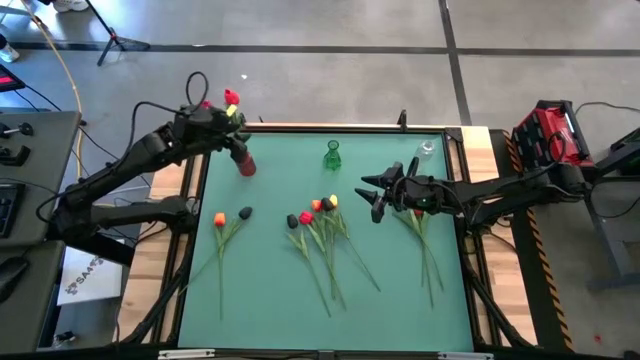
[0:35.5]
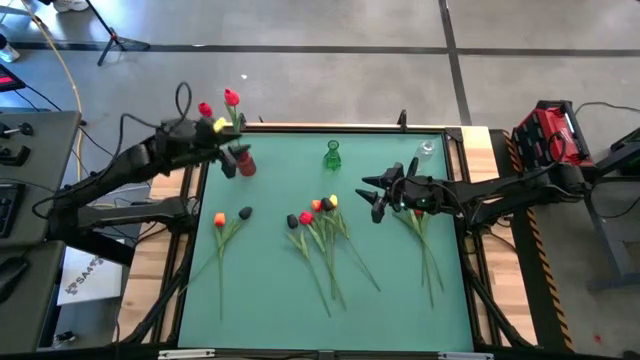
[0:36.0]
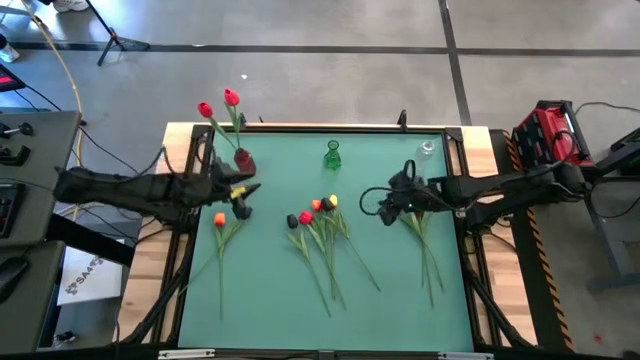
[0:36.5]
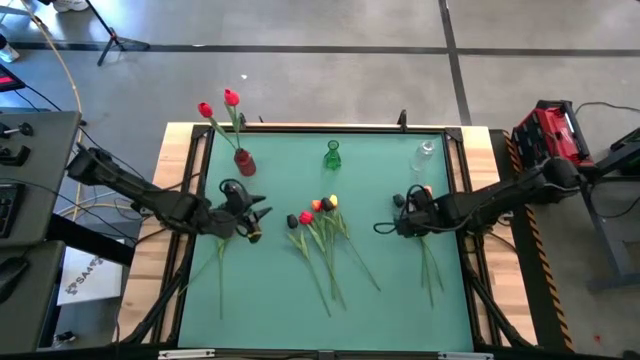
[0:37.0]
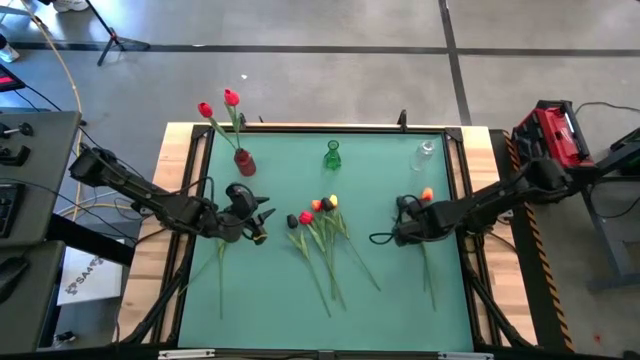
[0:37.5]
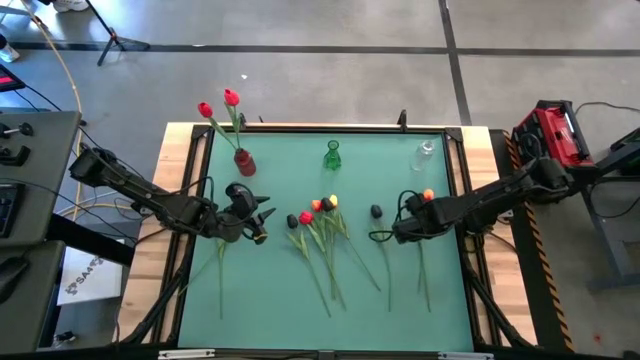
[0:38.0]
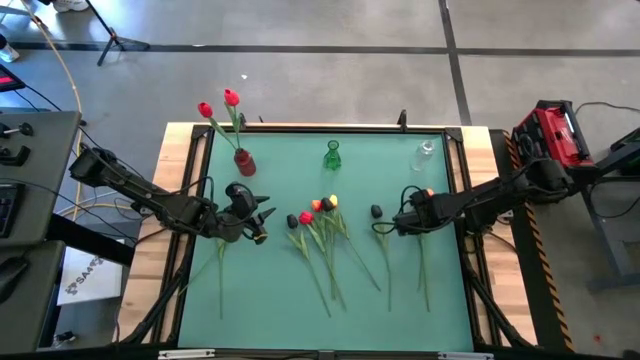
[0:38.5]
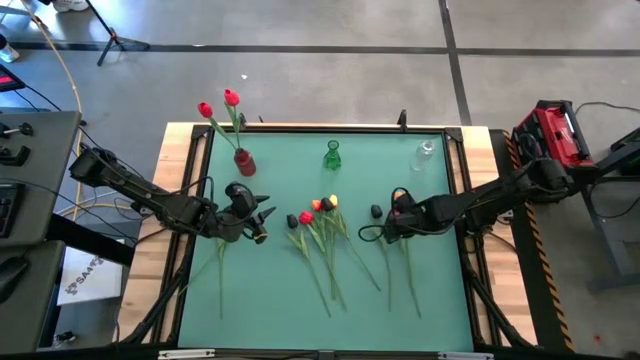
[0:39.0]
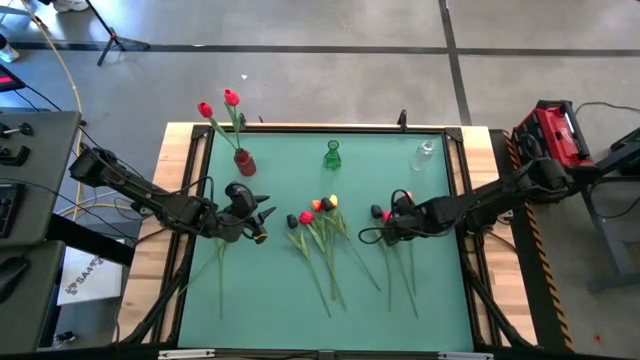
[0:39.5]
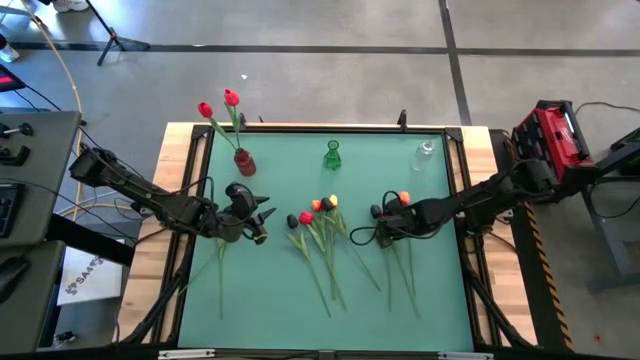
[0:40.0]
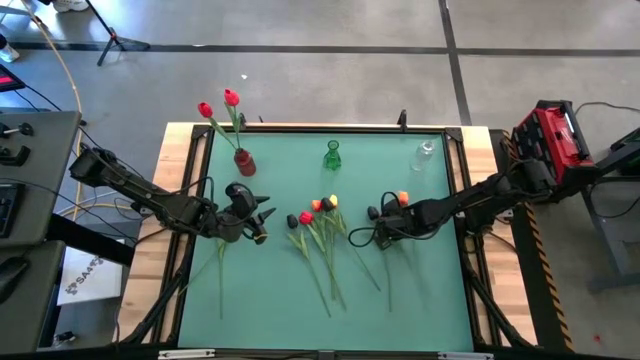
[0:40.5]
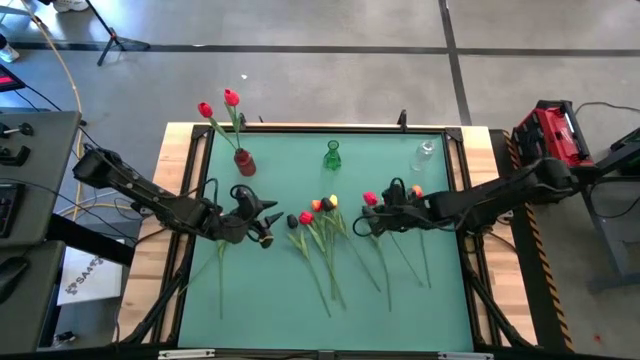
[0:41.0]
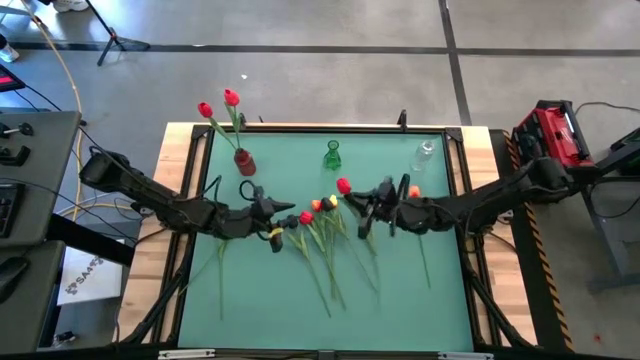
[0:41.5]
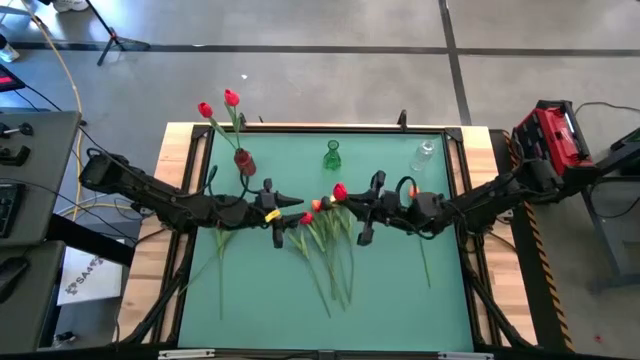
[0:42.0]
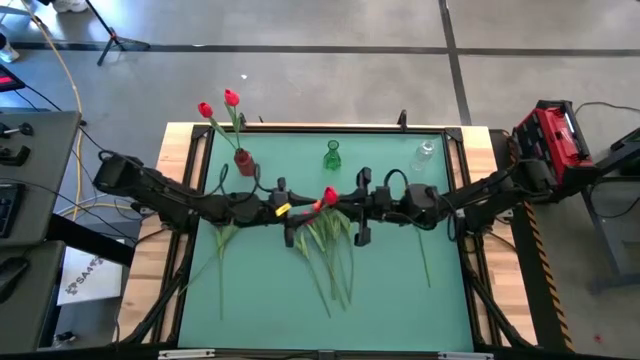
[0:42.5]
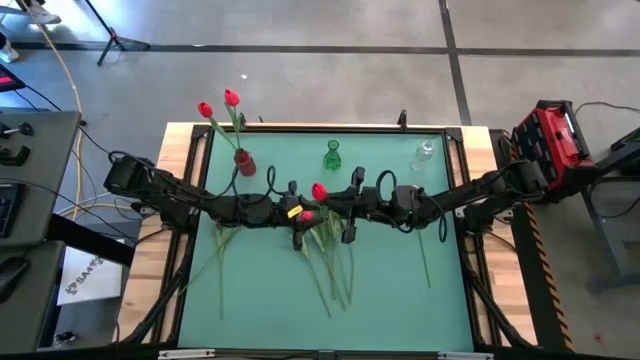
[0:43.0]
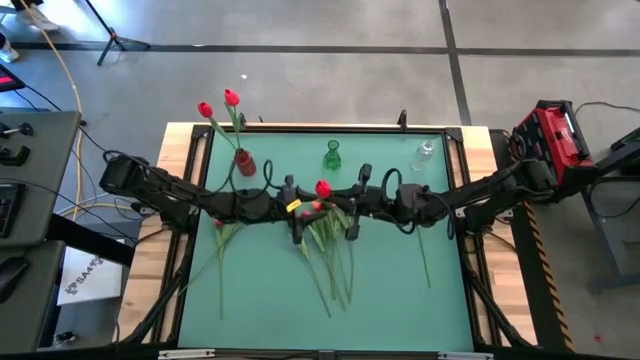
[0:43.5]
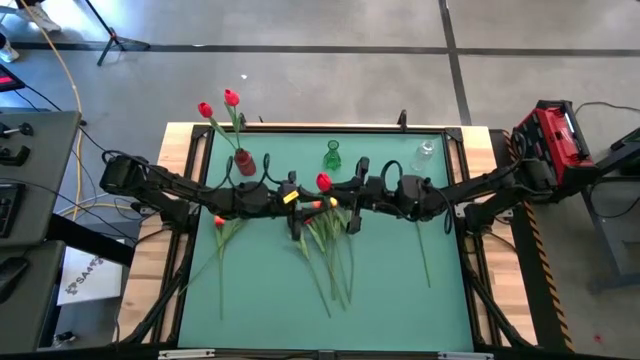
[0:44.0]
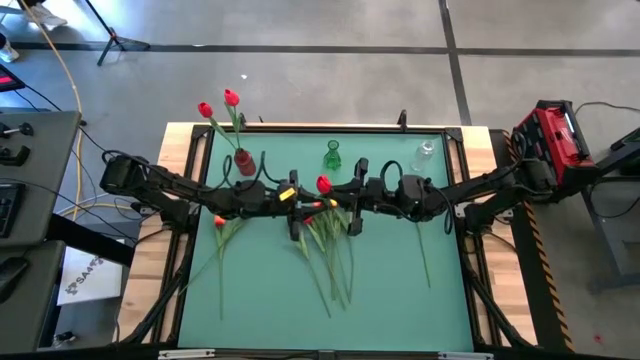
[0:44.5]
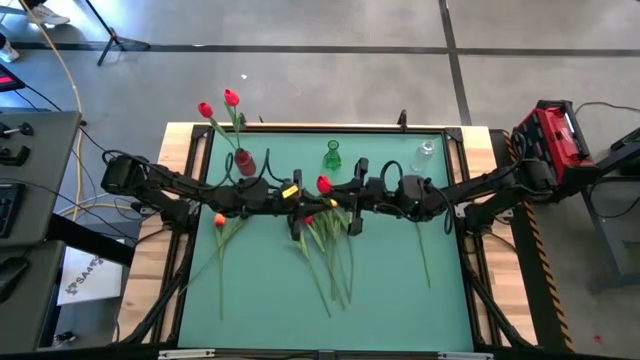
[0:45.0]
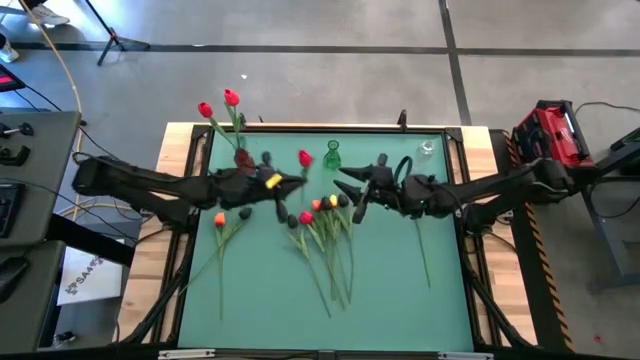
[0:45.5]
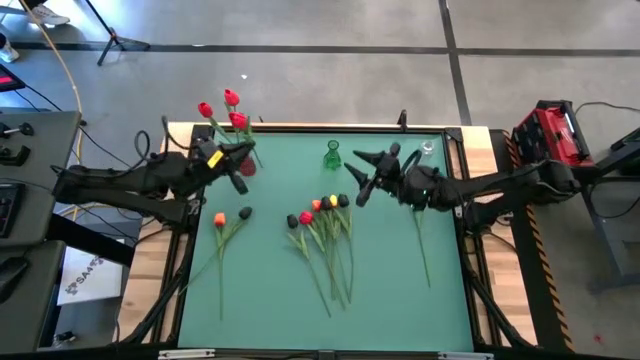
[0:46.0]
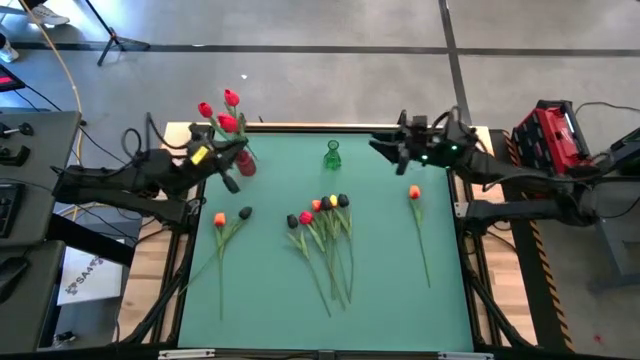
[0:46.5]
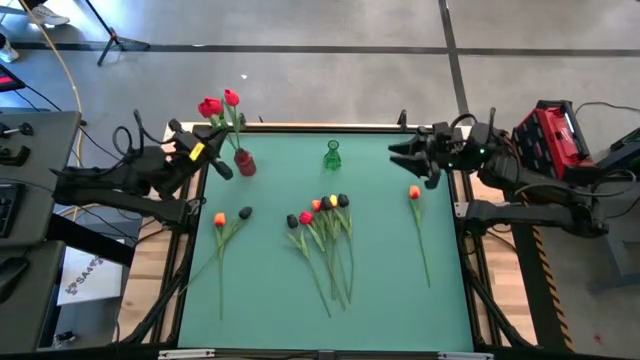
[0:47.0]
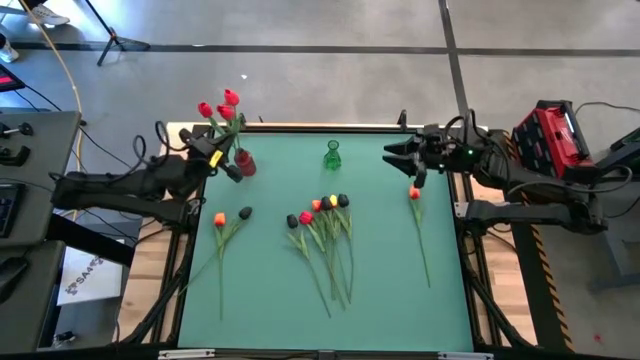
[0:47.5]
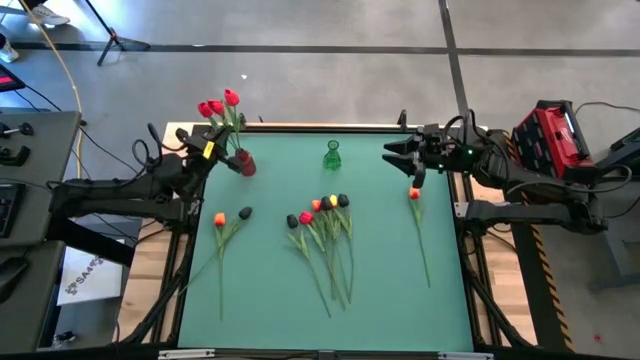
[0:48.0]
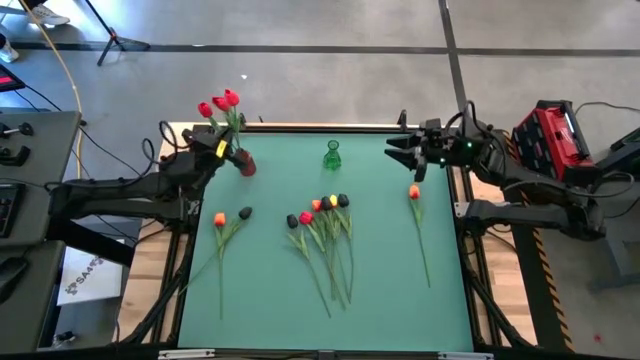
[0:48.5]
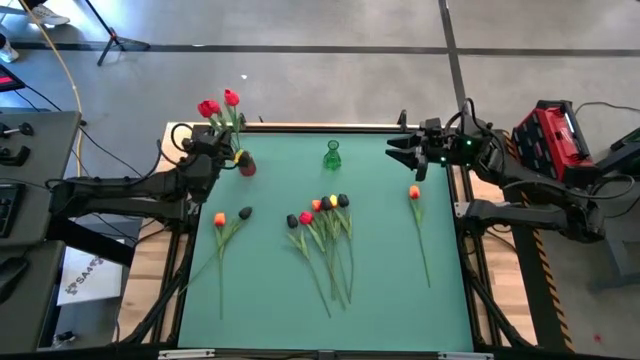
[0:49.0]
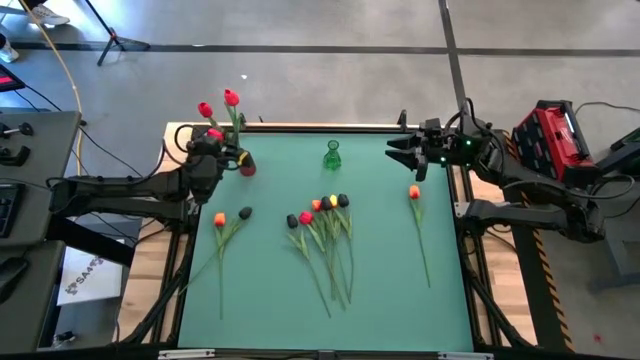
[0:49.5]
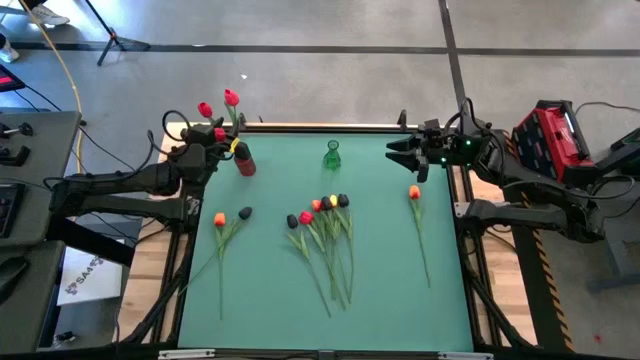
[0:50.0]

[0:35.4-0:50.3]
Task: Sort flowers into vase by color
Put the red tulip into the red vase

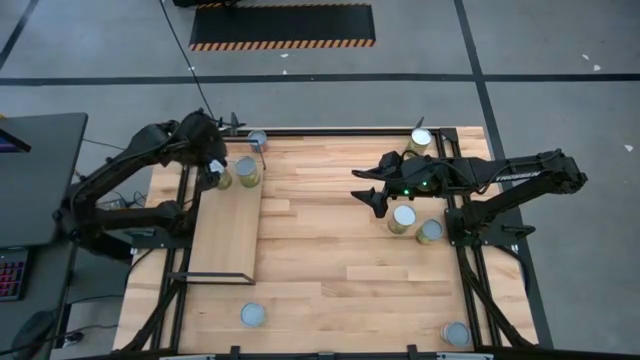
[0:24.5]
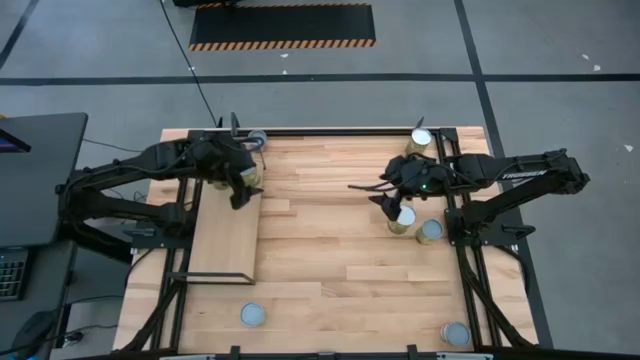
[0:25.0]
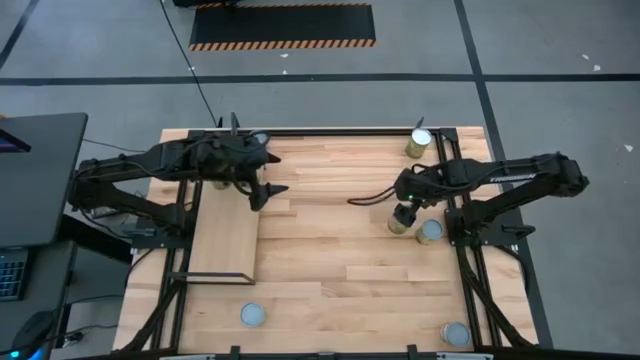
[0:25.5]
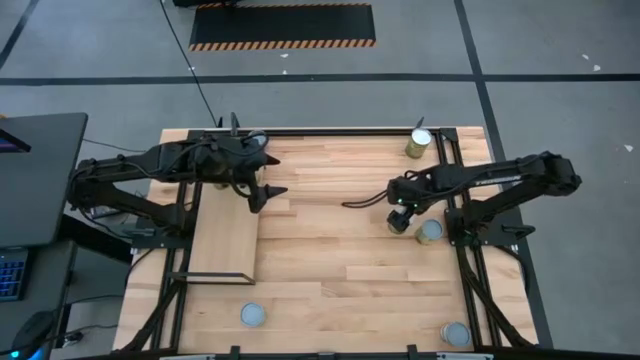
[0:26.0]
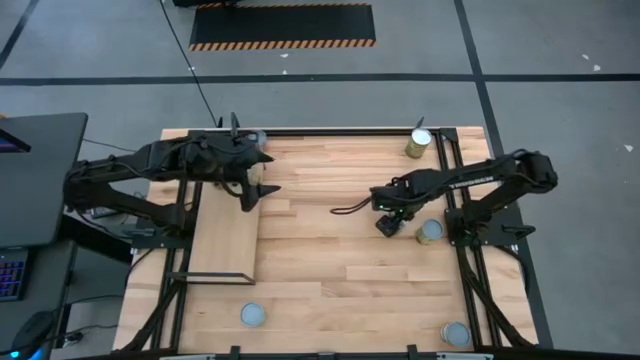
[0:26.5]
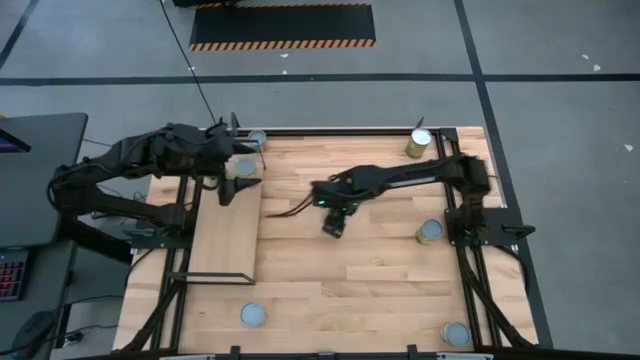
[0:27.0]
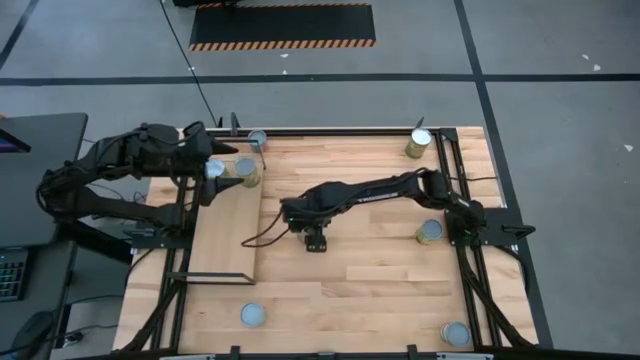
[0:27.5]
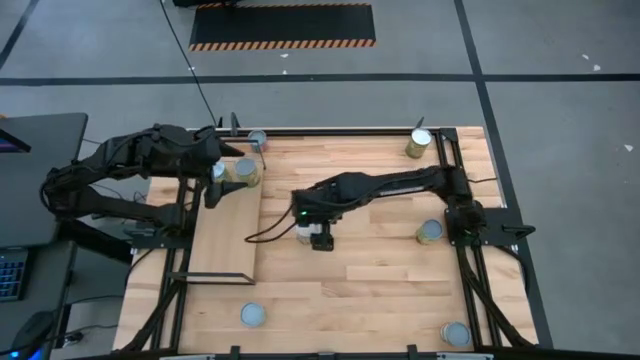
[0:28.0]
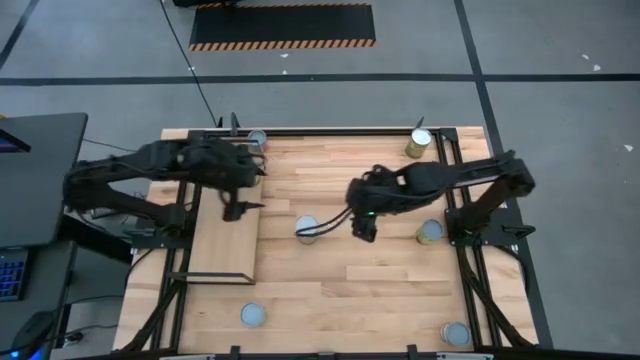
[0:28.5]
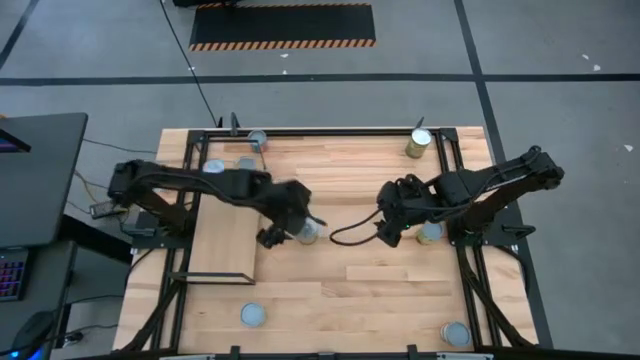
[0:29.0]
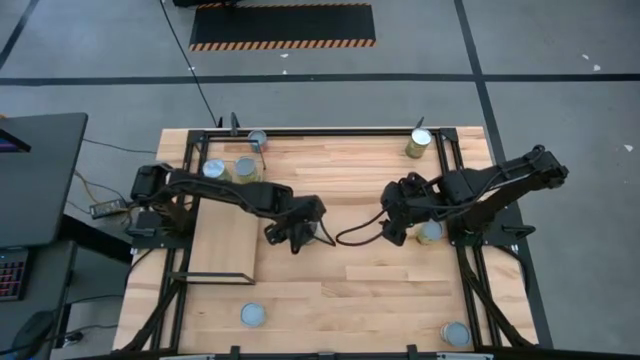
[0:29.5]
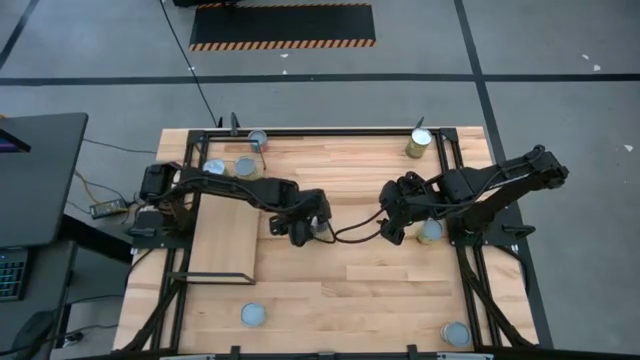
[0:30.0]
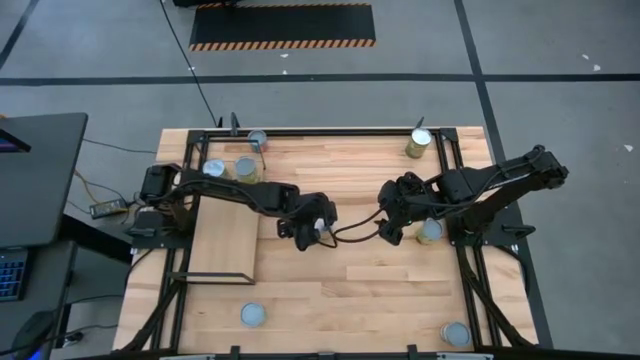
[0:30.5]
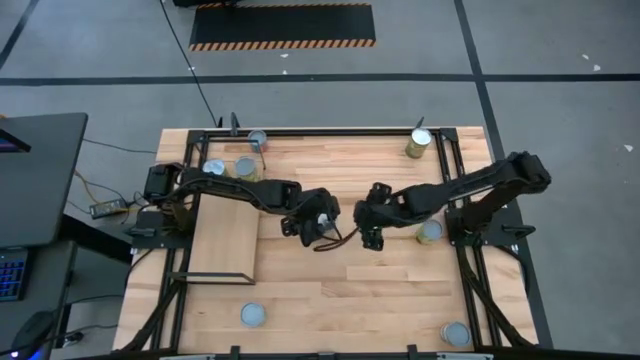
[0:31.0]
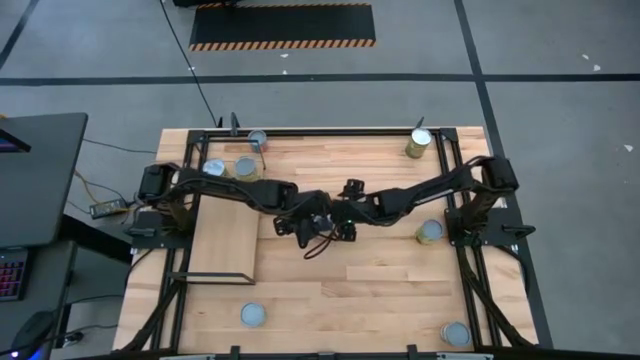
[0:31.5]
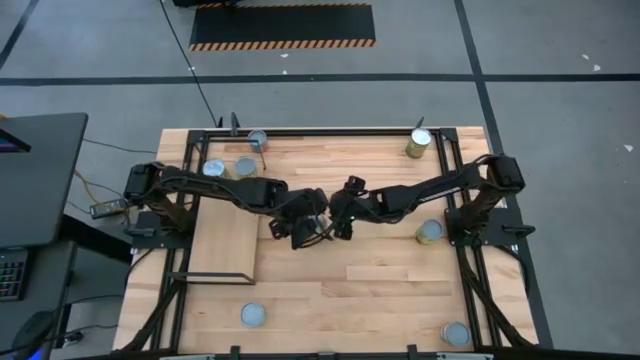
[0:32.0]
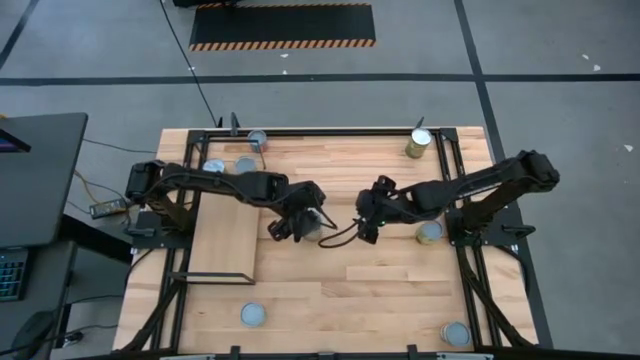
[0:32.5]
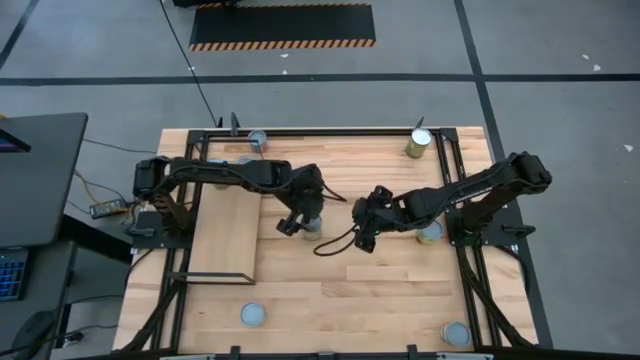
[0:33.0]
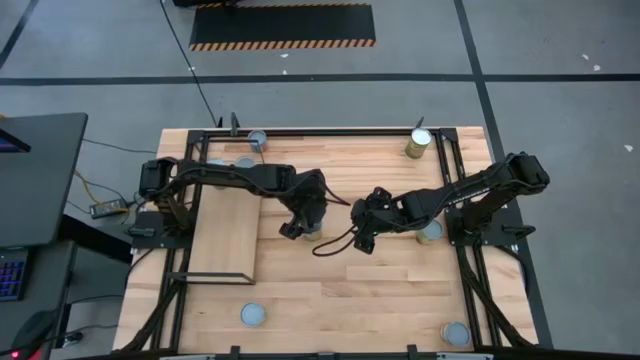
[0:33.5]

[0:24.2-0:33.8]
Task: Pick and place cans onto a shelf
Put the top large canned oranges on the shelf
